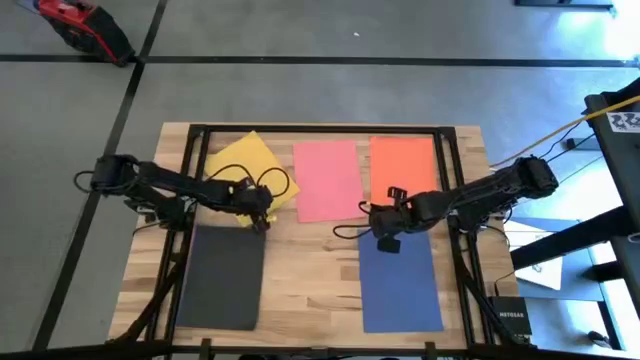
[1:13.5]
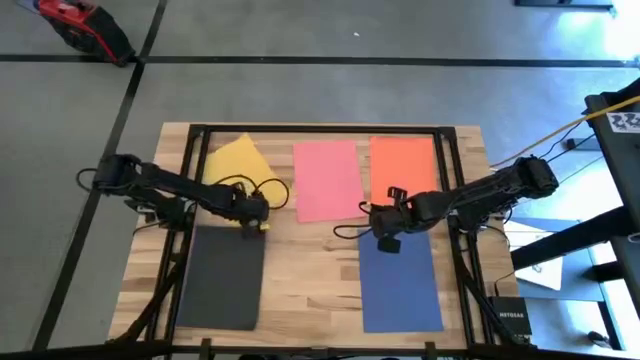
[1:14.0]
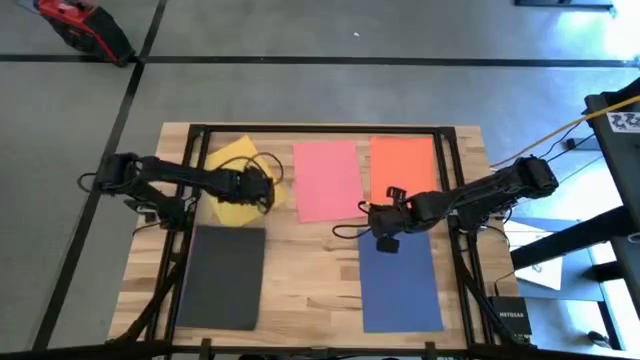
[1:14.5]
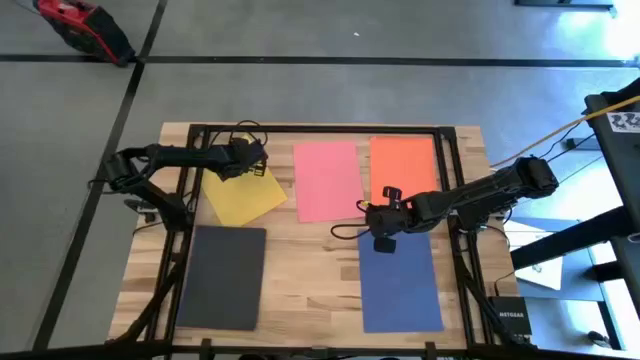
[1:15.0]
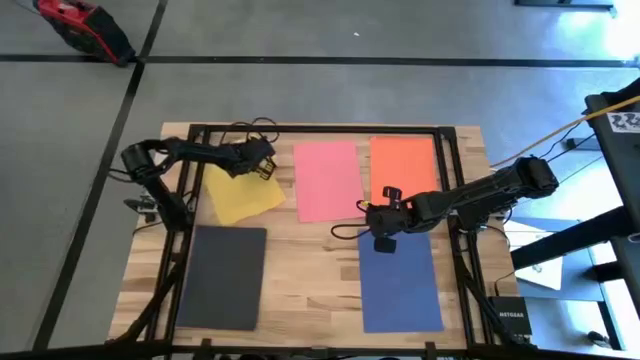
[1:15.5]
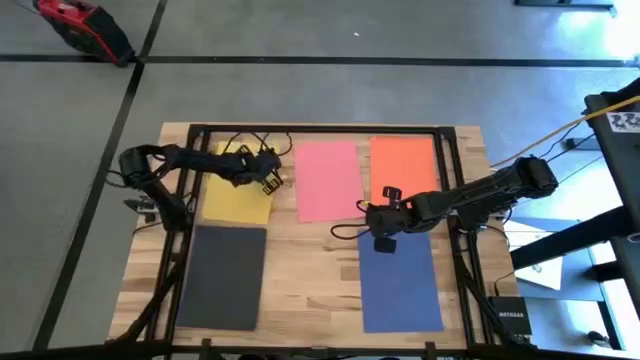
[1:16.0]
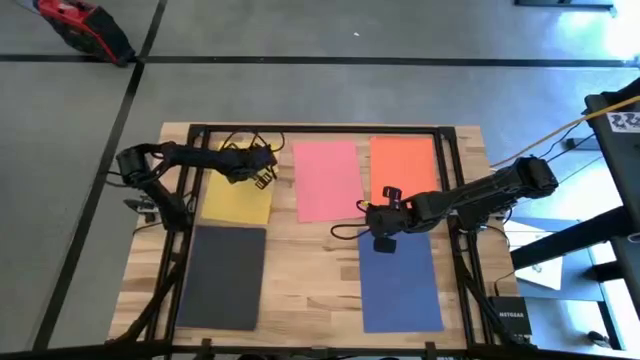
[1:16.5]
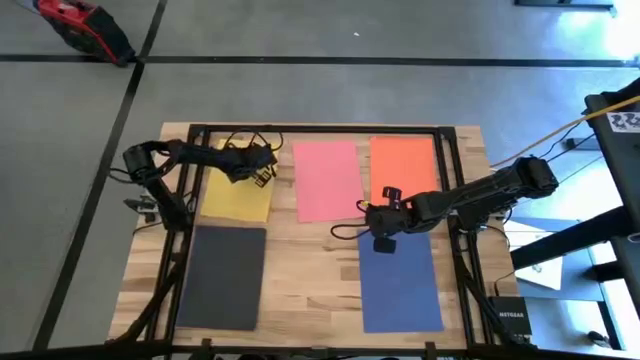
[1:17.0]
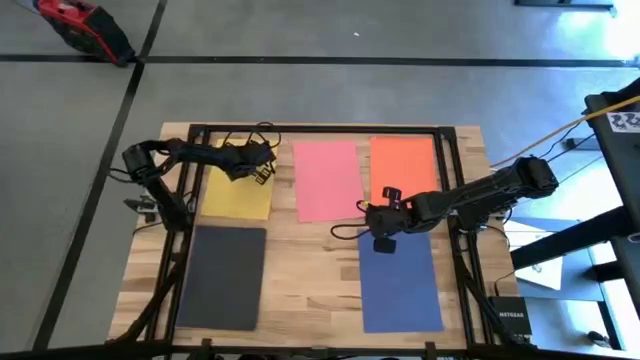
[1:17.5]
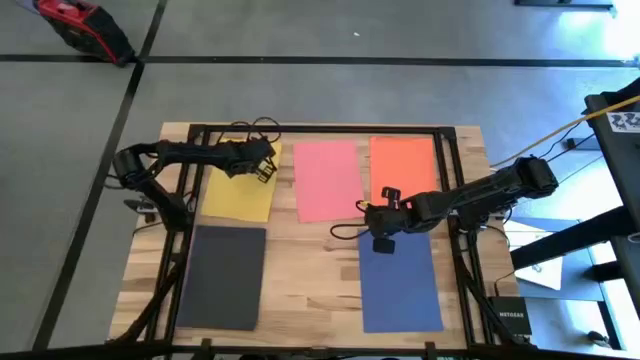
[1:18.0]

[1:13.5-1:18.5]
Task: Organize paper
Adjust the yellow paper on the table

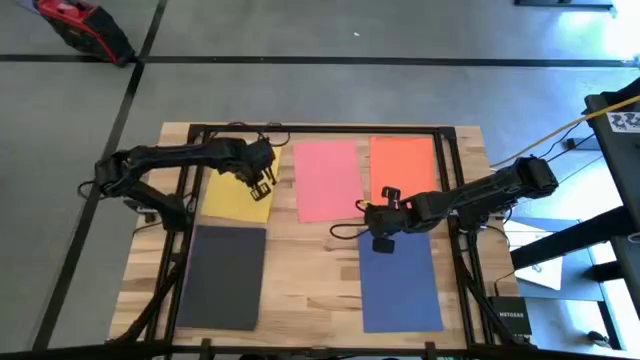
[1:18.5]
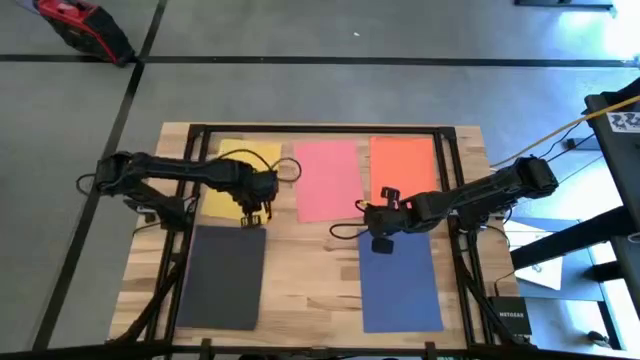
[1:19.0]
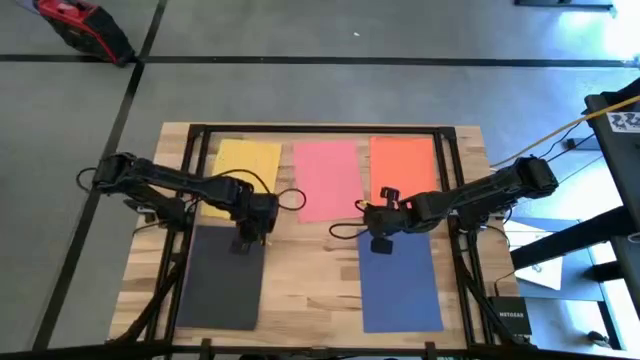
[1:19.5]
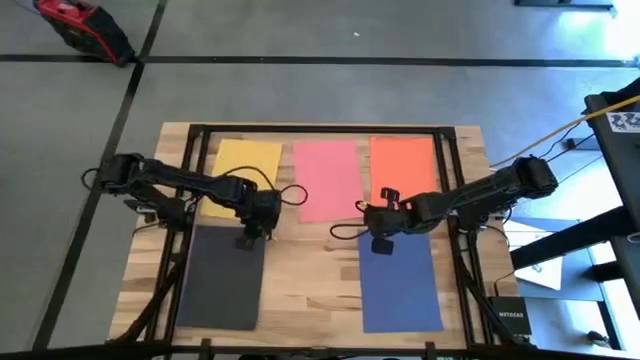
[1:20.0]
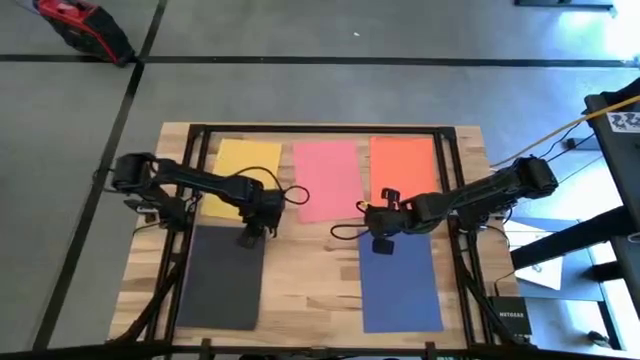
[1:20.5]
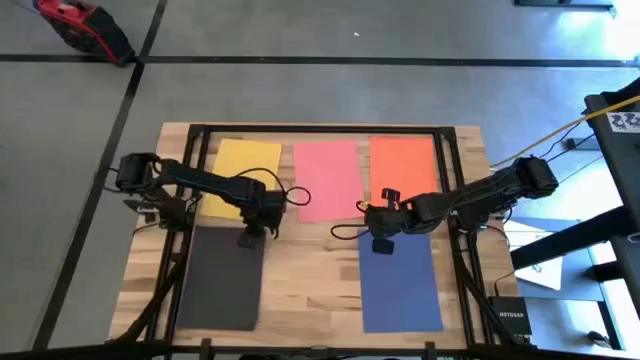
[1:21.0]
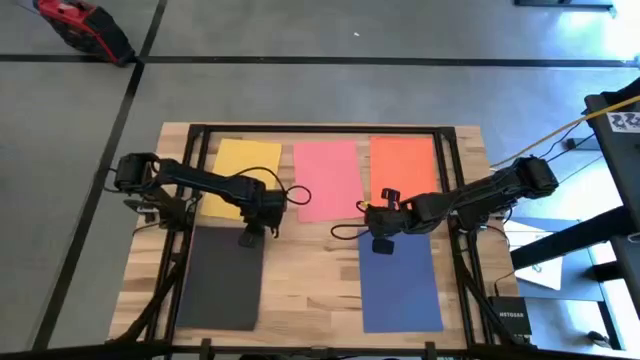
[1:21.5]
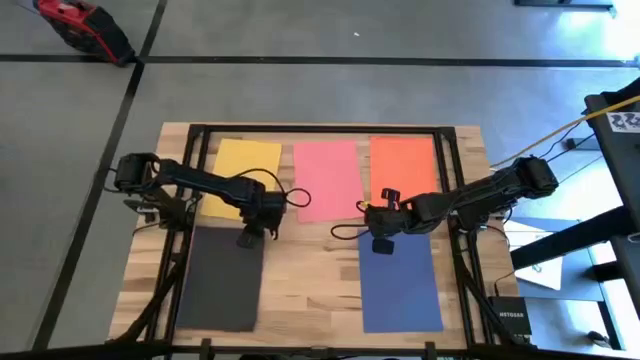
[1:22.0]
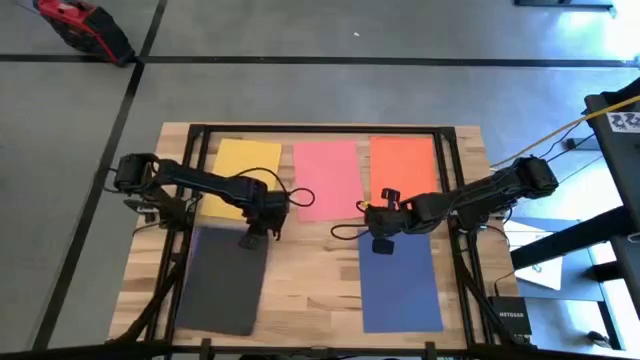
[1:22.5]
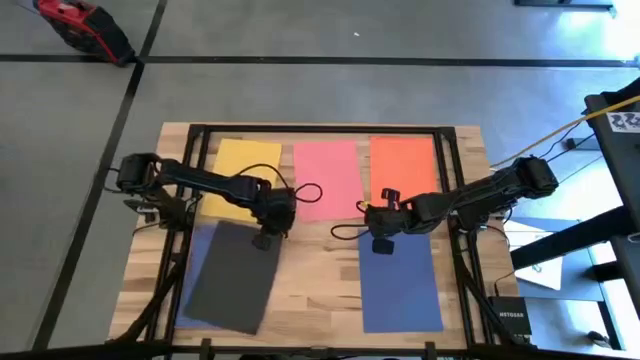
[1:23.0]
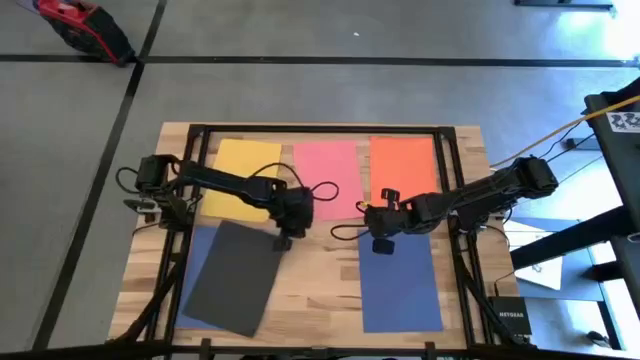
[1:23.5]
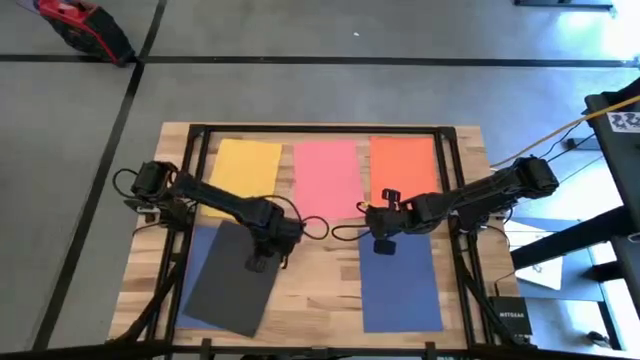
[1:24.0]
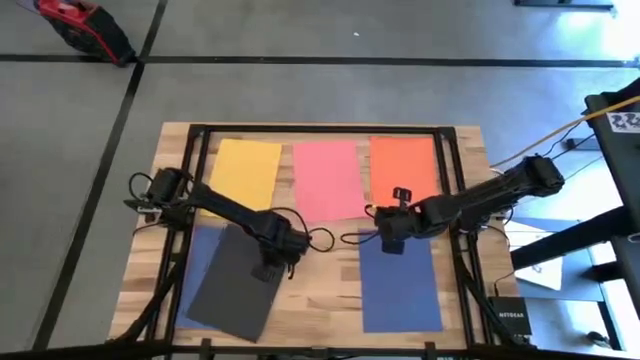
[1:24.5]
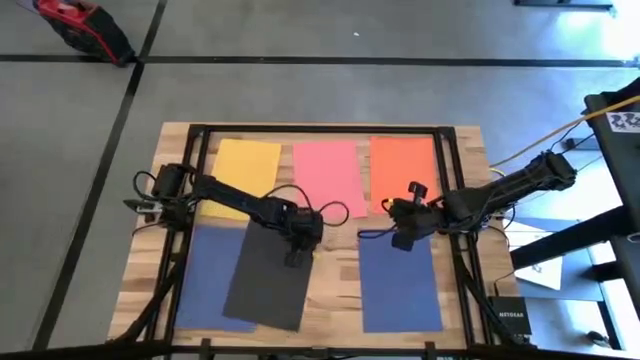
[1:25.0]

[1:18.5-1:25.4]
Move the black paper from bottom left to bottom middle table

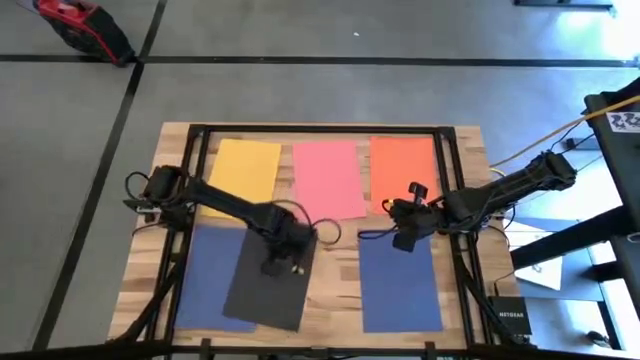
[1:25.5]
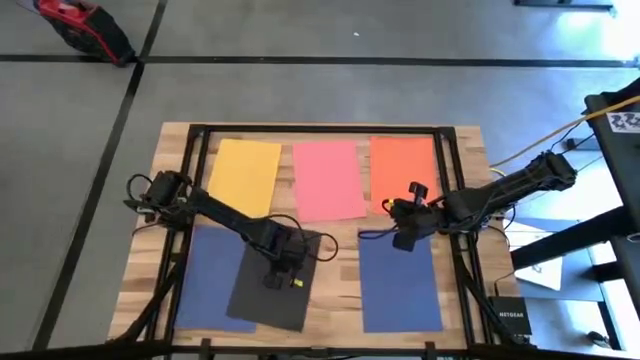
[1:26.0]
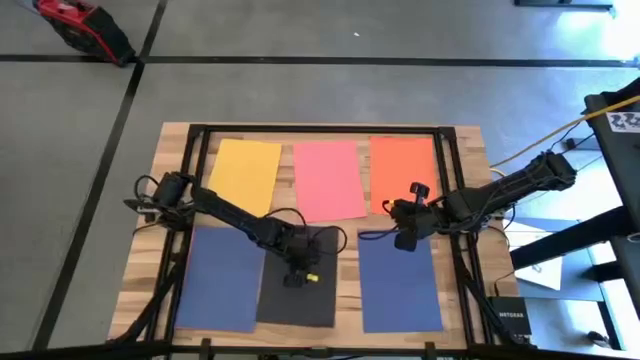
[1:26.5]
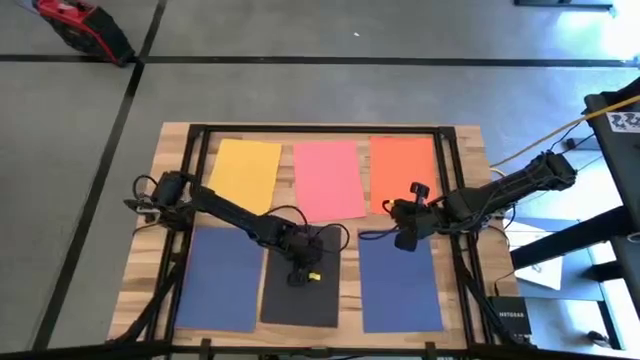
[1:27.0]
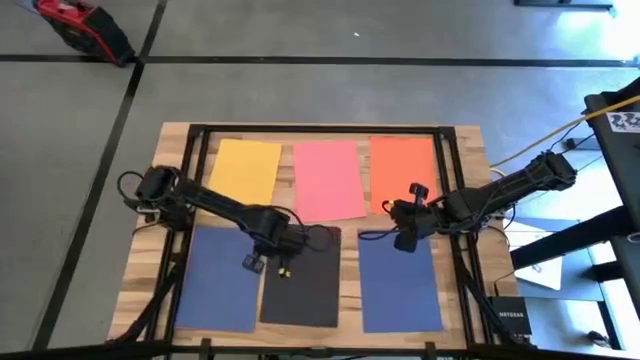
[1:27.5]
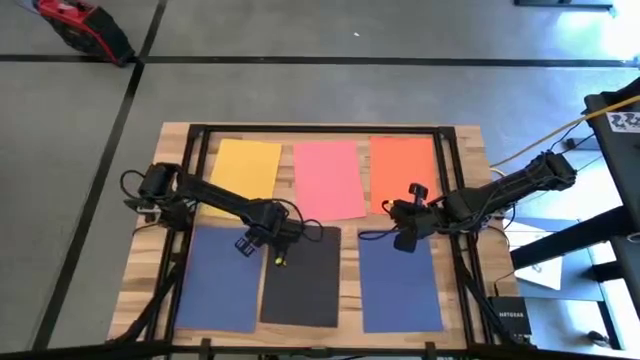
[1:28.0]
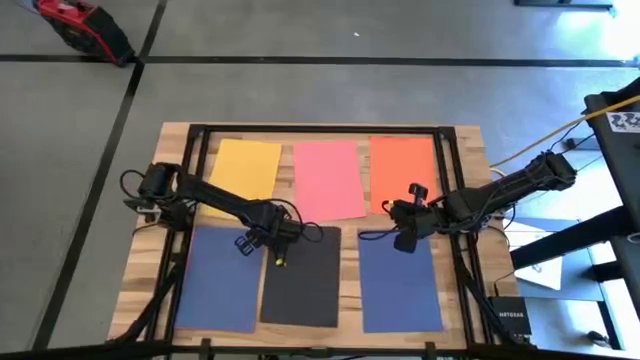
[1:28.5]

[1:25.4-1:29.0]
Move the black paper from bottom left to bottom middle table

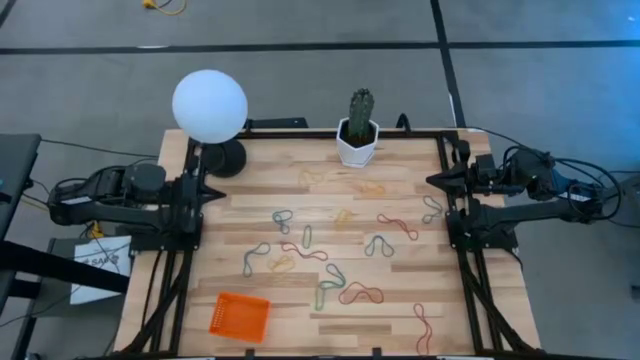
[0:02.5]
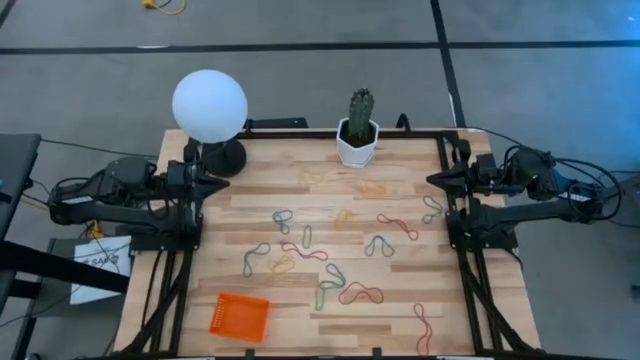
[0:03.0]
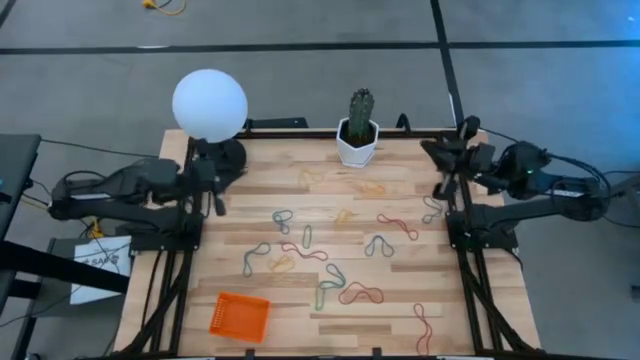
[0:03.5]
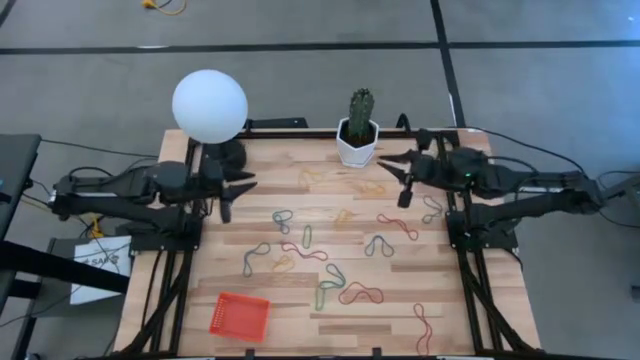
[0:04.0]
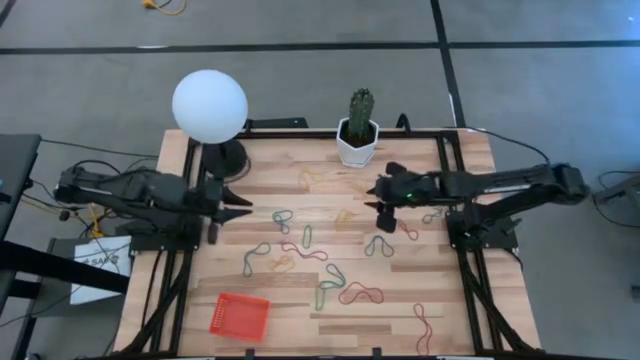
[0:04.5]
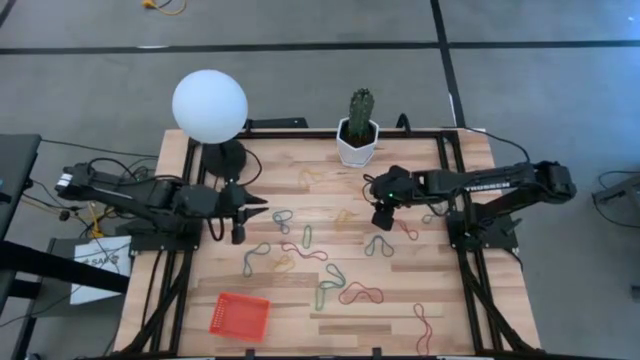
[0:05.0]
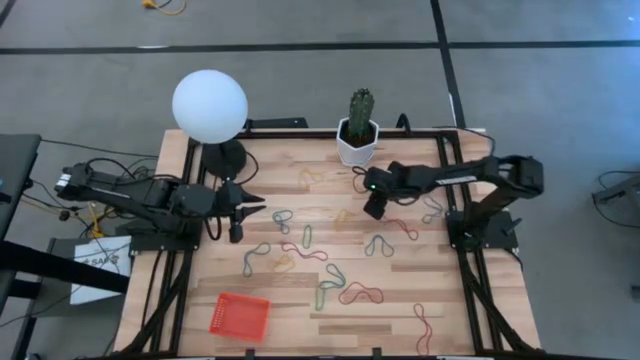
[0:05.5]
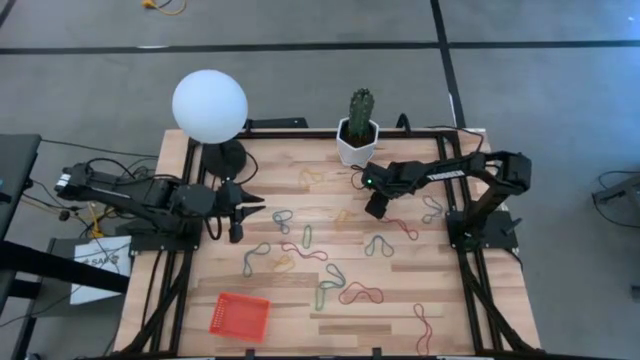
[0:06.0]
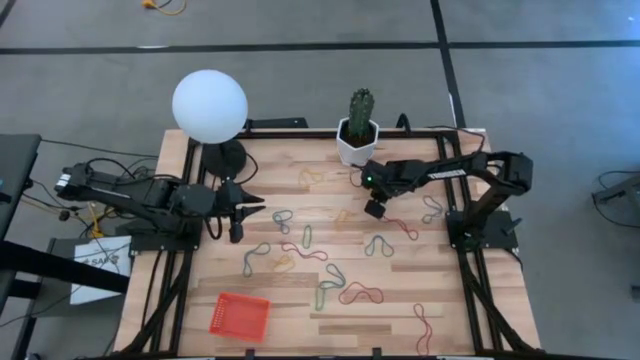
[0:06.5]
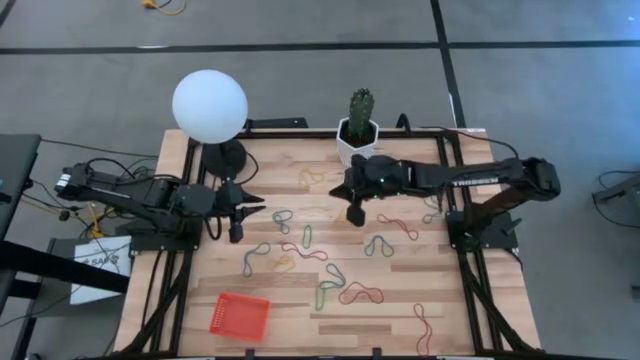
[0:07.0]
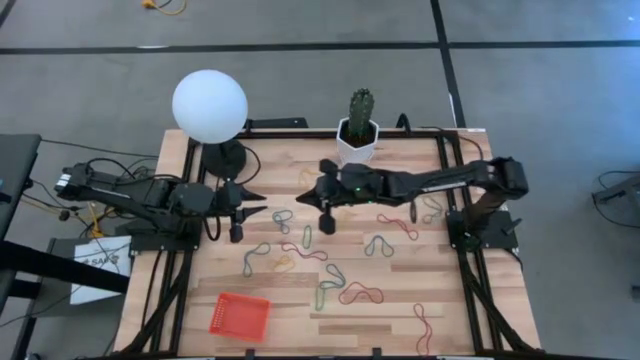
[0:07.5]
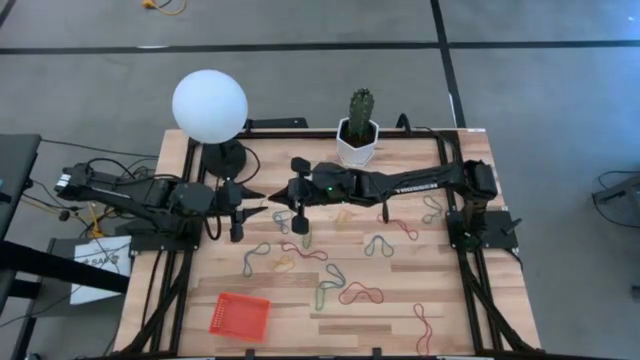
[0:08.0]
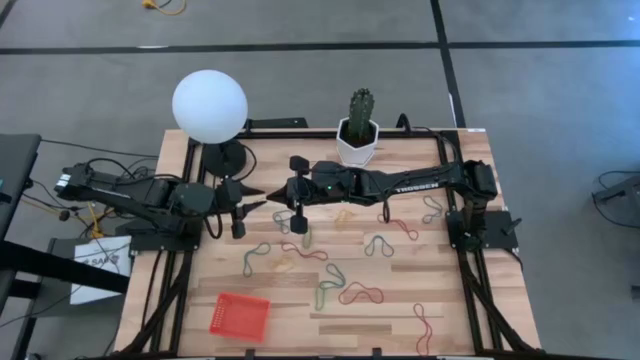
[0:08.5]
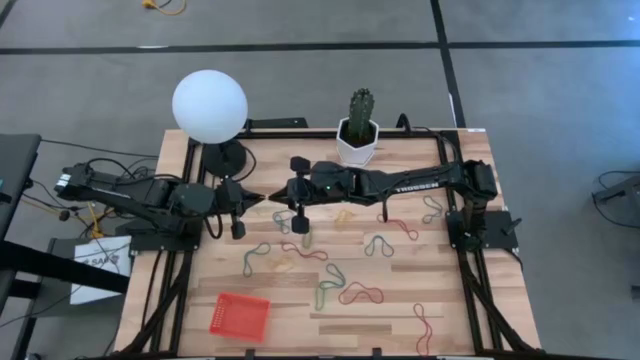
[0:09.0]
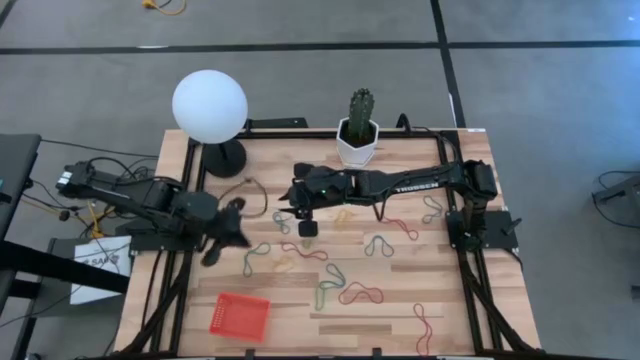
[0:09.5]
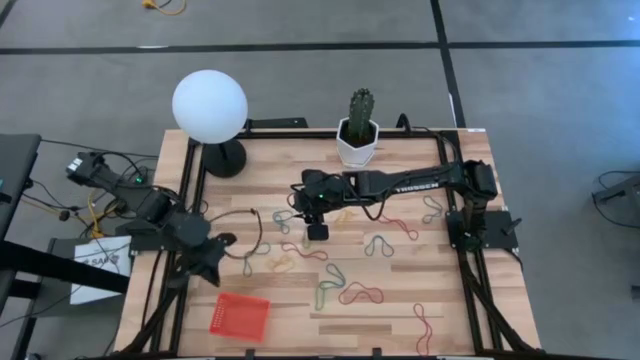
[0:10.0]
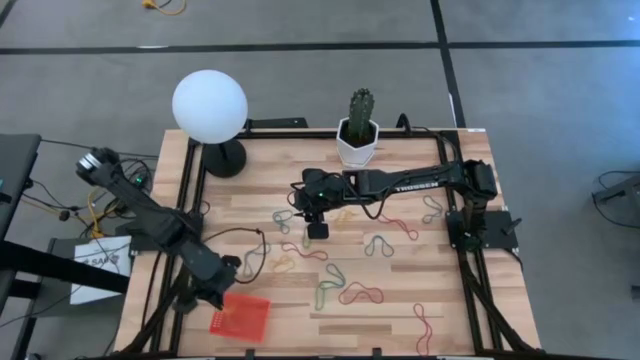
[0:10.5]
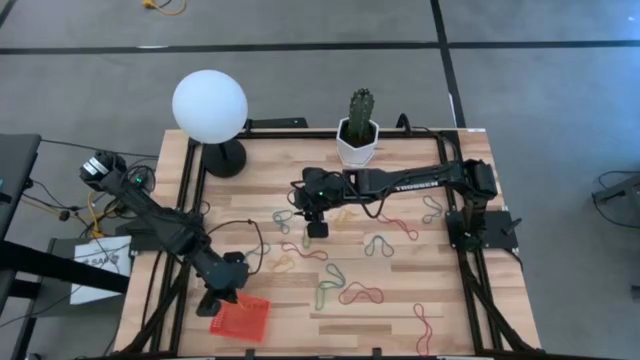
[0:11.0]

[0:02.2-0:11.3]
Task: Pick and place rubber bands into bin
Put the yellow rubber band into the basket
